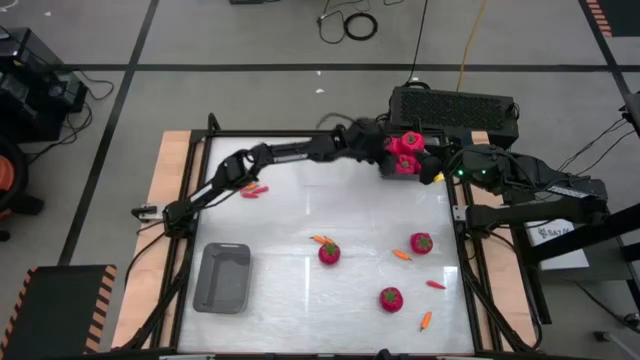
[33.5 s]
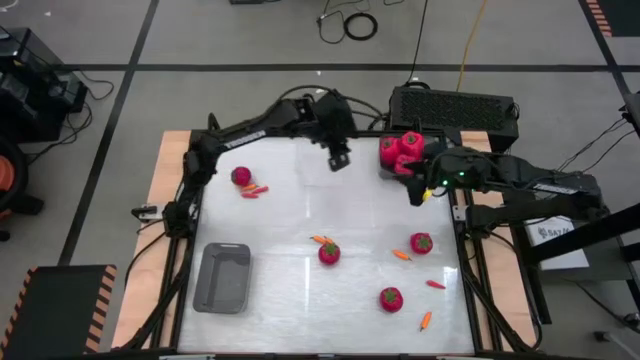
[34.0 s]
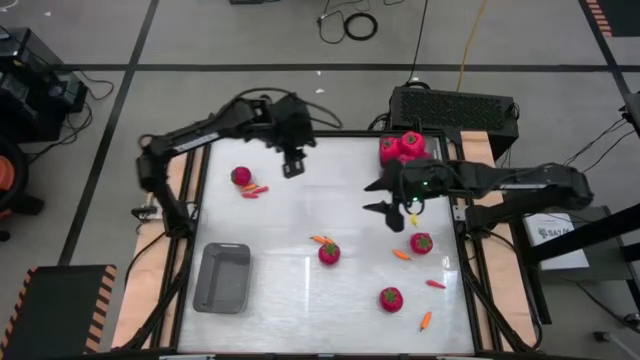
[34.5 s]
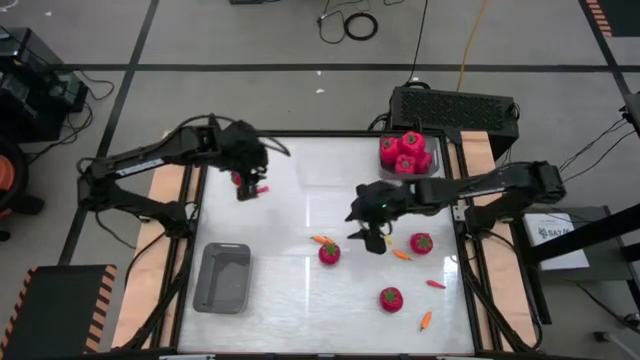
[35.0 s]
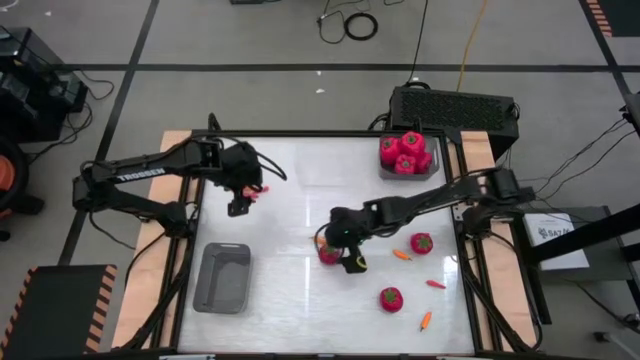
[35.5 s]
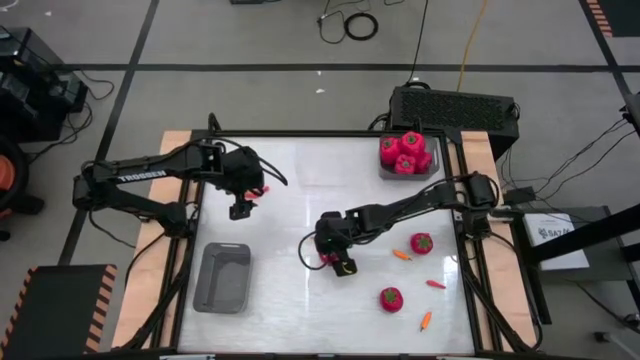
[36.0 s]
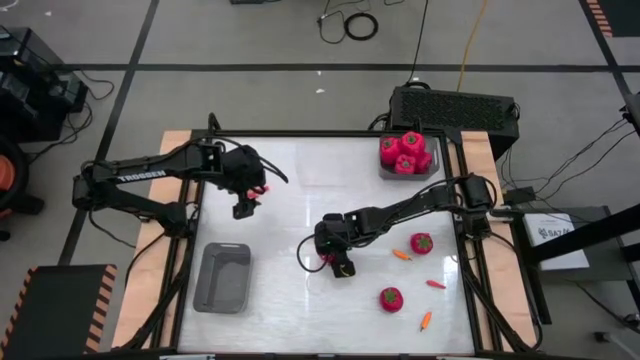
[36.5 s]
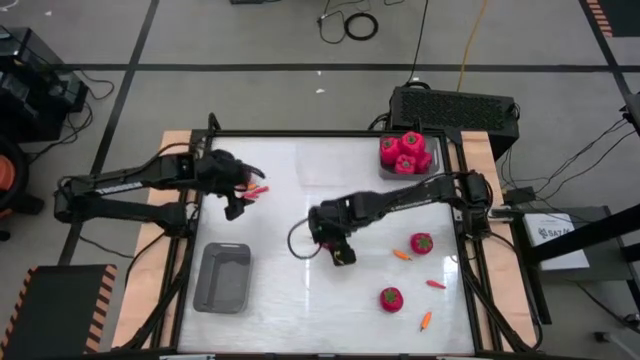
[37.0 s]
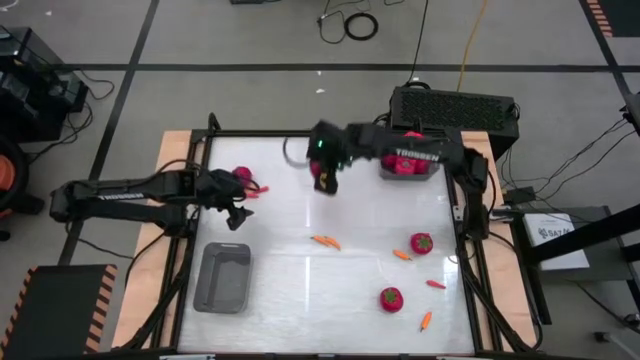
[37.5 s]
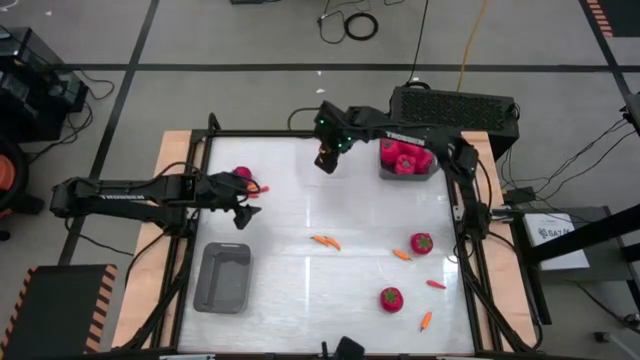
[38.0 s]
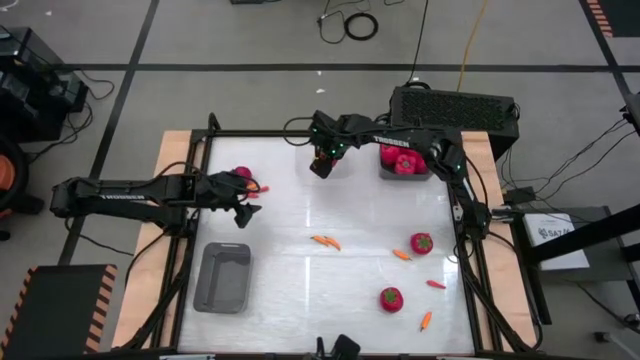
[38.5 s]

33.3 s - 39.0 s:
Task: Sort produce into baskets
Put the red tomato into the transparent bin

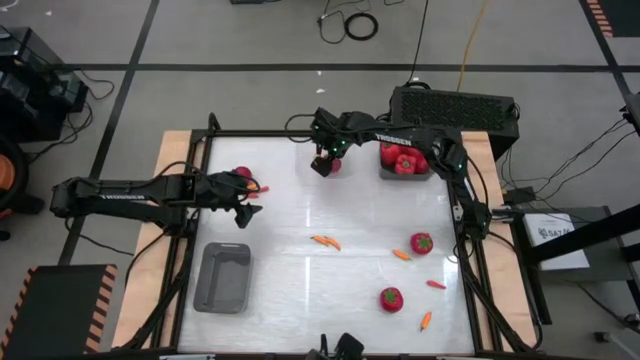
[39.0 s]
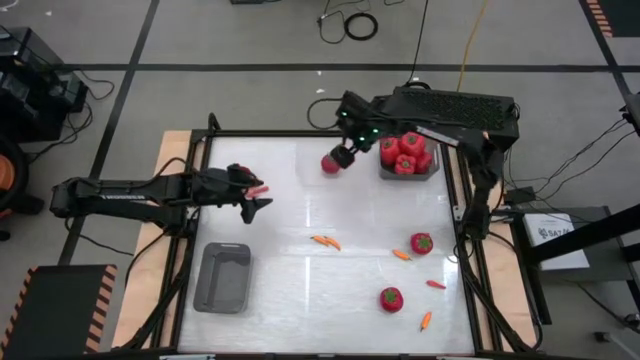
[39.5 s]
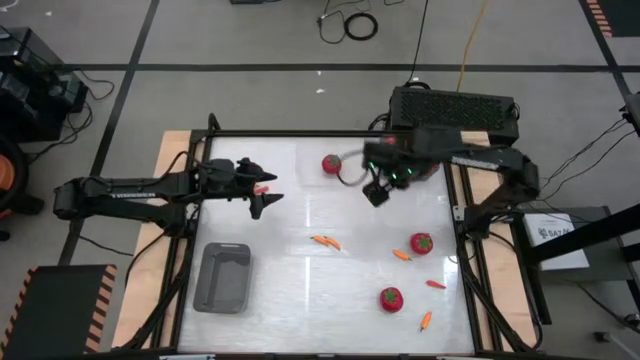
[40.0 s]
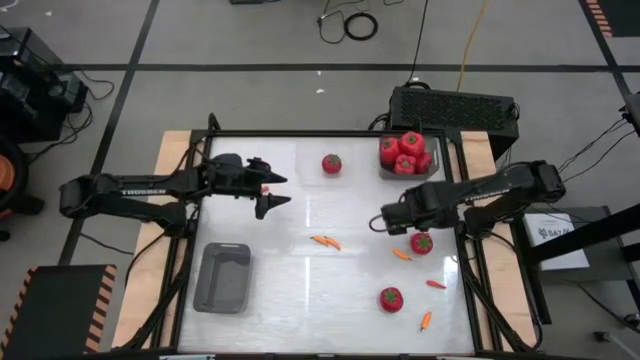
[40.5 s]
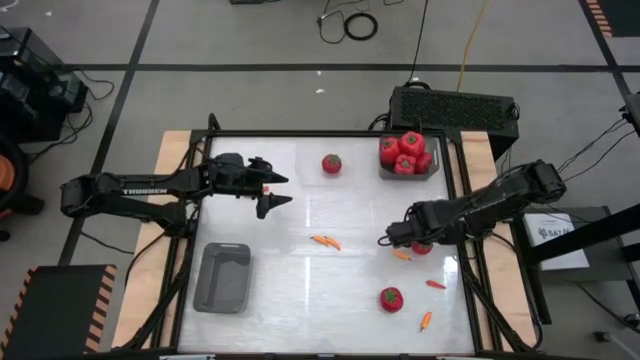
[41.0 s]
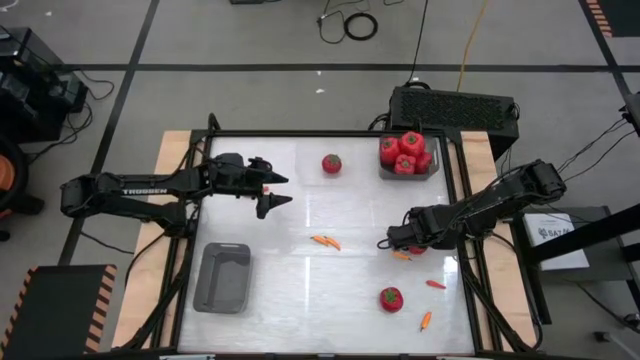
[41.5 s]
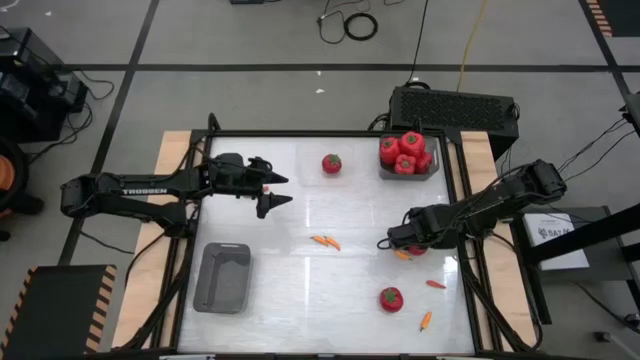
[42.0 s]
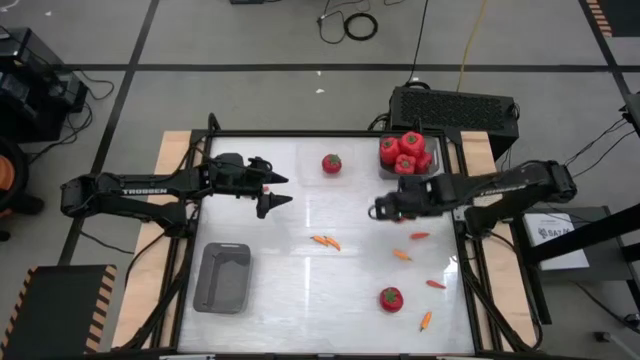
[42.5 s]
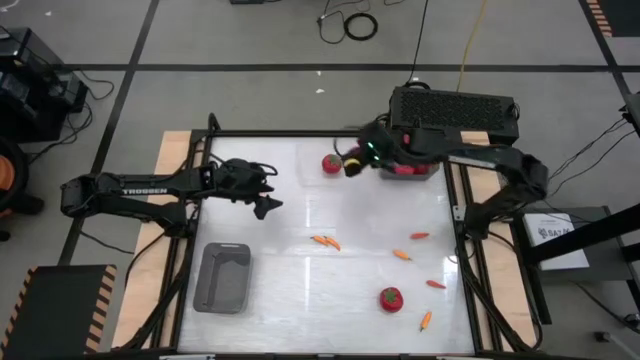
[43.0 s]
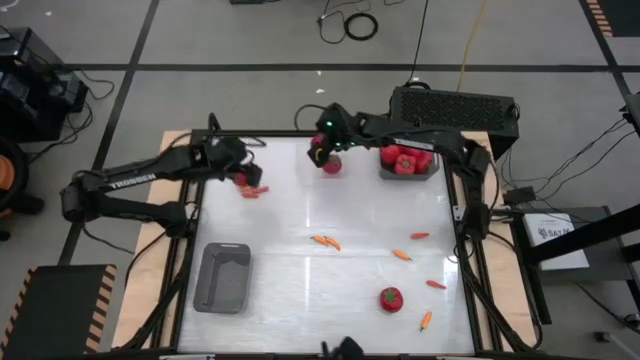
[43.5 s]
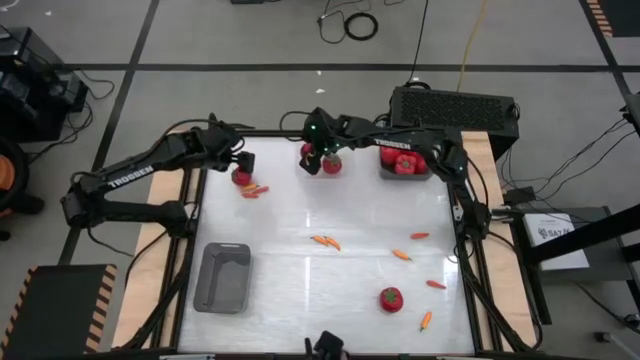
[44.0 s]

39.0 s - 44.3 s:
Put the red tomato into the transparent bin

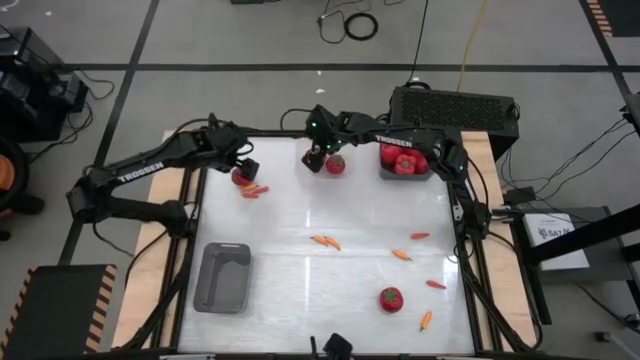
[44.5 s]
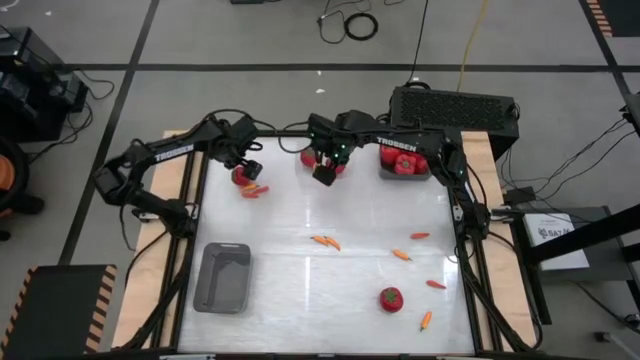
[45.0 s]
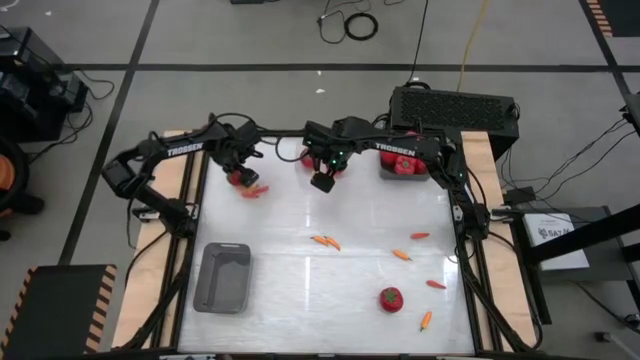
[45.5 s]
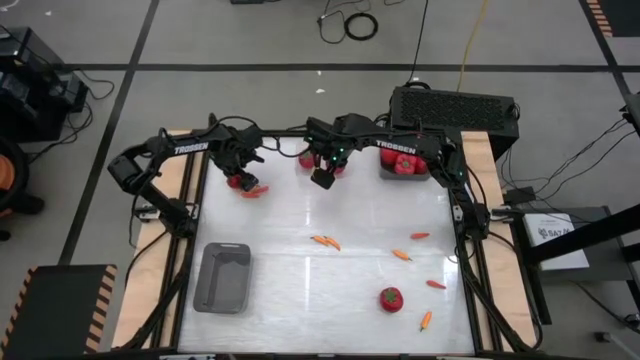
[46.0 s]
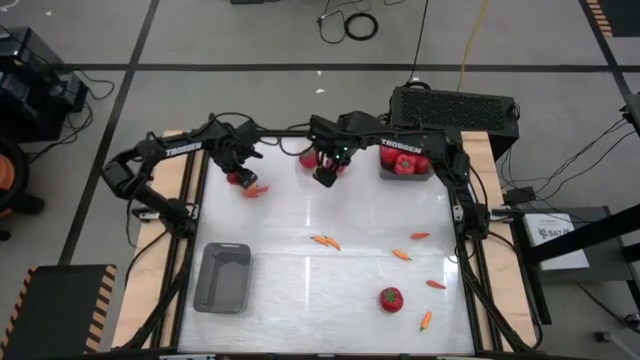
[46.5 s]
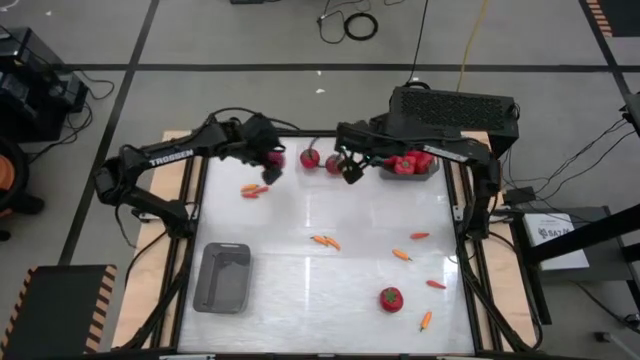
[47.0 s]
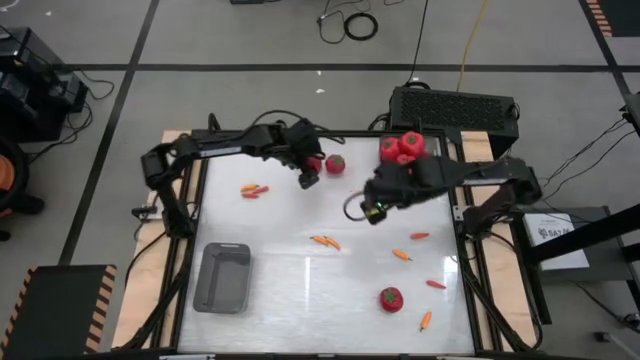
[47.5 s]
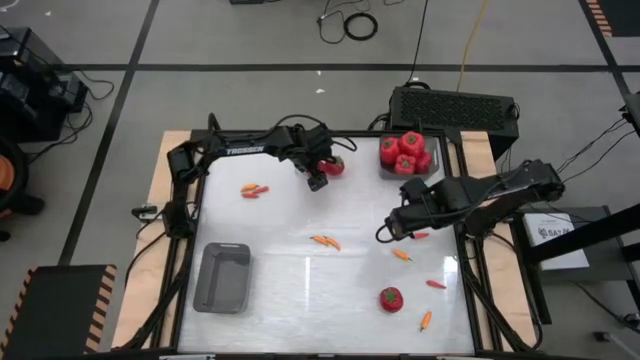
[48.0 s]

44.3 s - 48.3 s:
Put the red tomato into the transparent bin

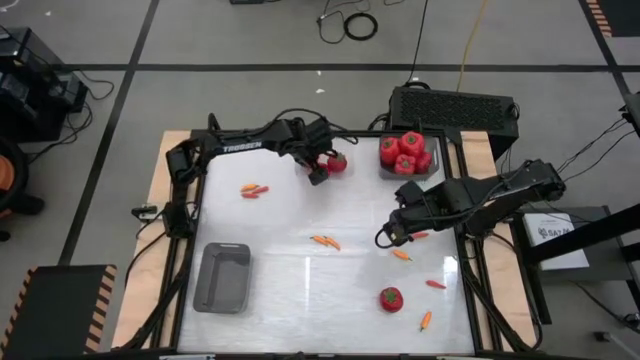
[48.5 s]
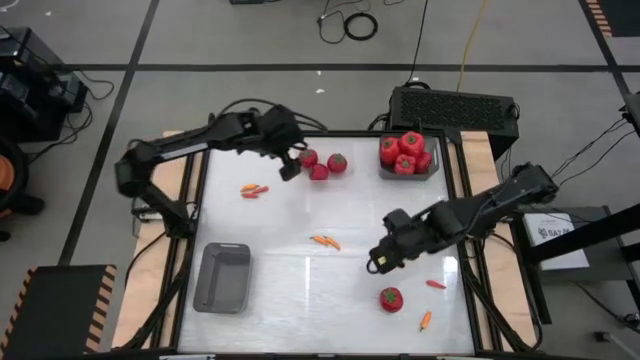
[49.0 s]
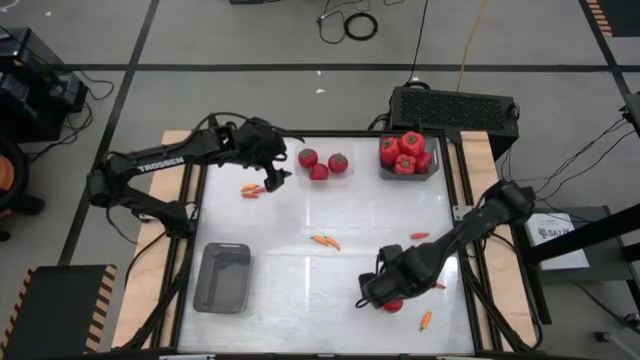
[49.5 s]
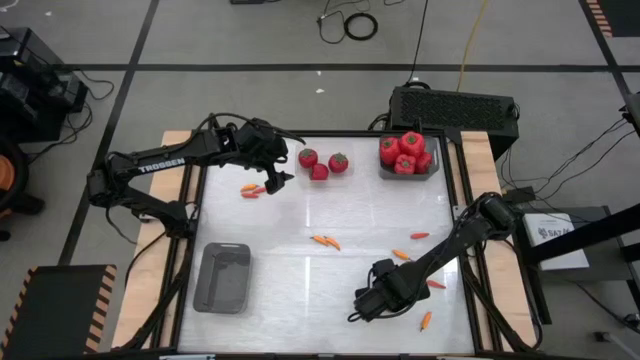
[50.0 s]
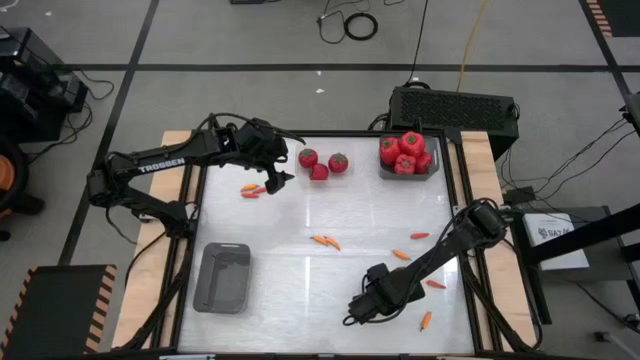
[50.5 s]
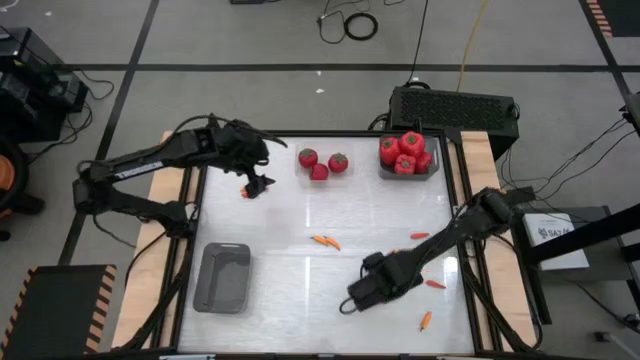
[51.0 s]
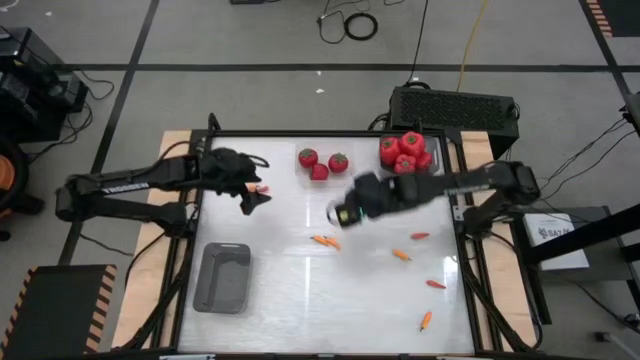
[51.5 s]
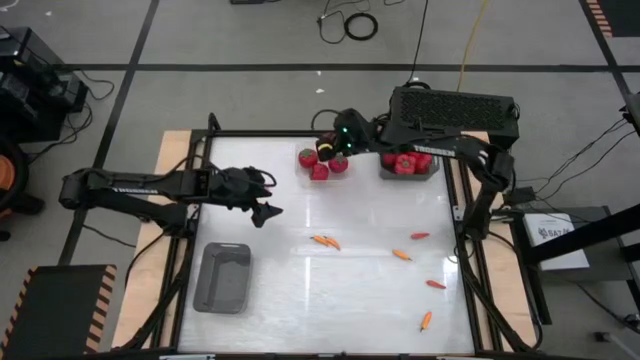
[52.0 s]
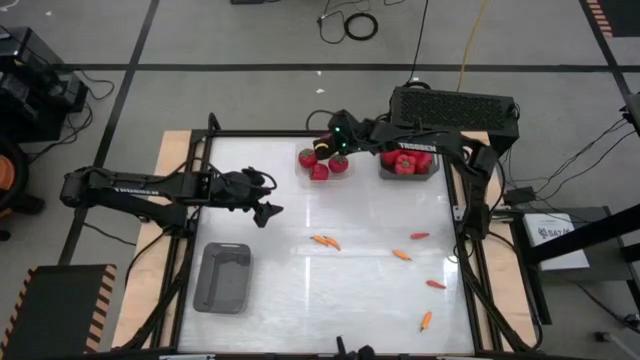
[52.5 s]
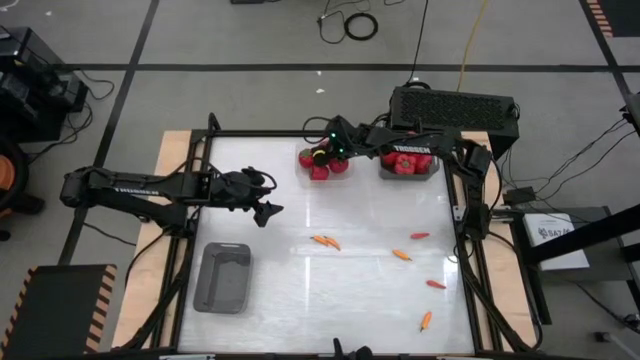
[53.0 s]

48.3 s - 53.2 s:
Put the red tomato into the transparent bin
